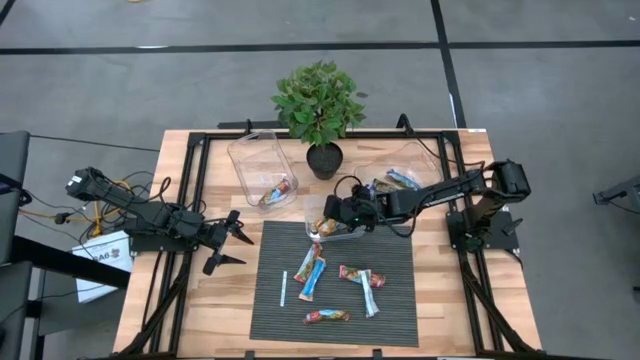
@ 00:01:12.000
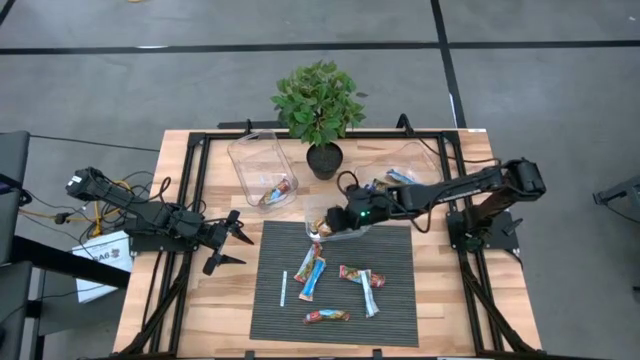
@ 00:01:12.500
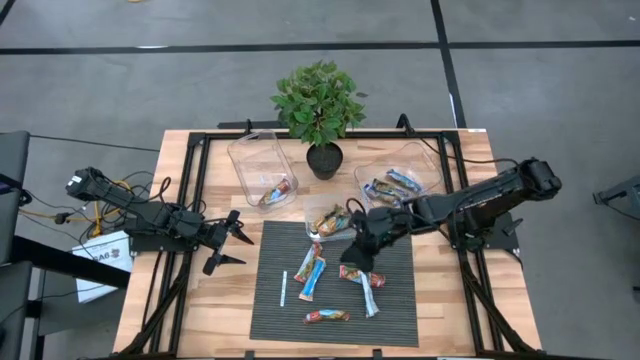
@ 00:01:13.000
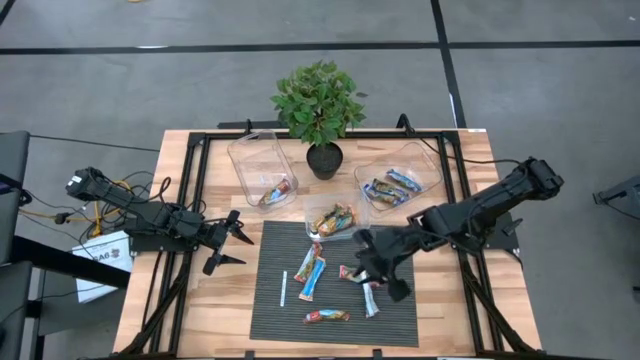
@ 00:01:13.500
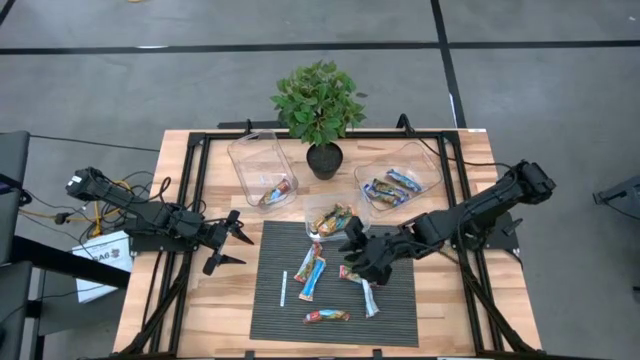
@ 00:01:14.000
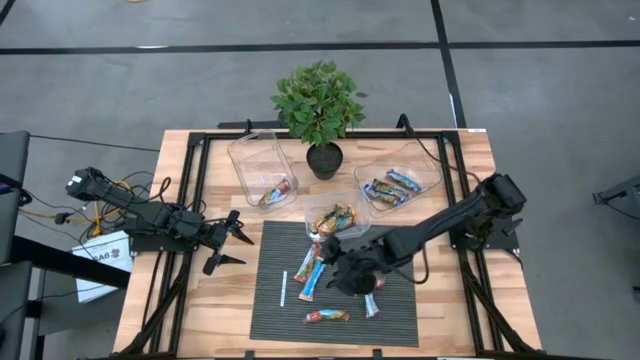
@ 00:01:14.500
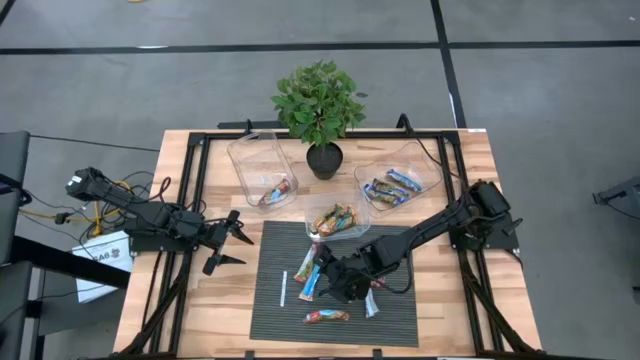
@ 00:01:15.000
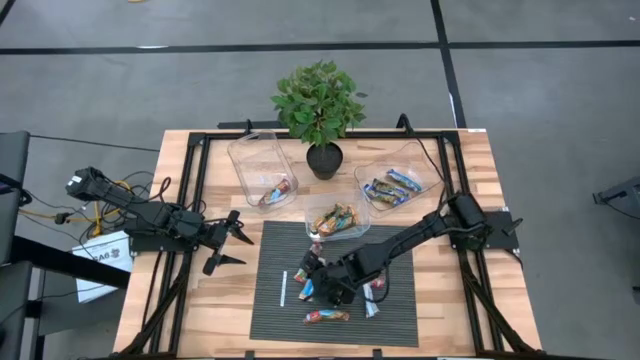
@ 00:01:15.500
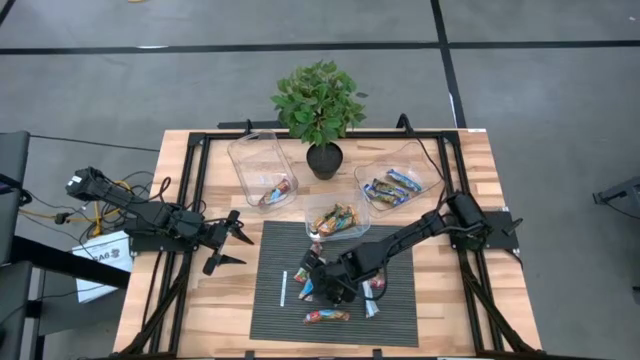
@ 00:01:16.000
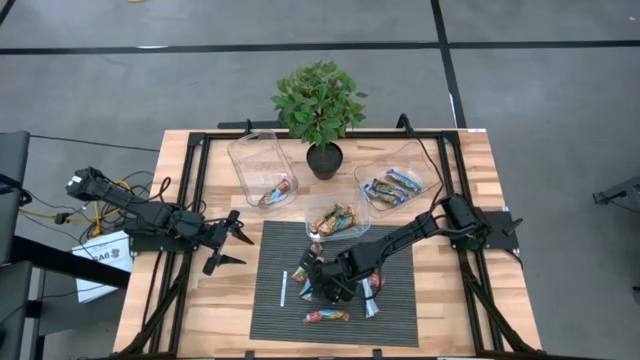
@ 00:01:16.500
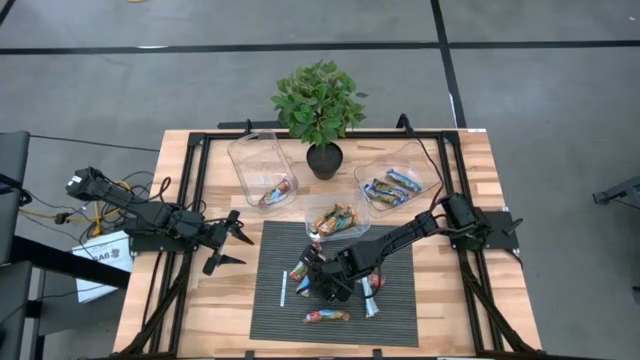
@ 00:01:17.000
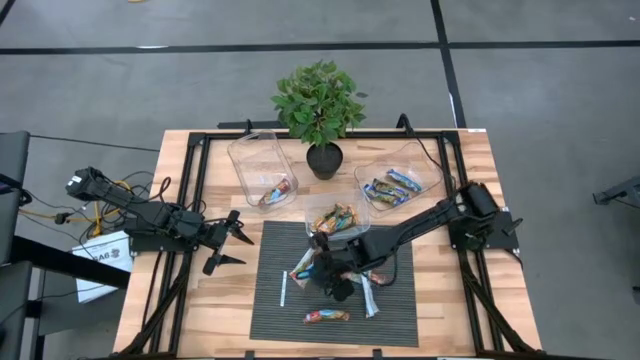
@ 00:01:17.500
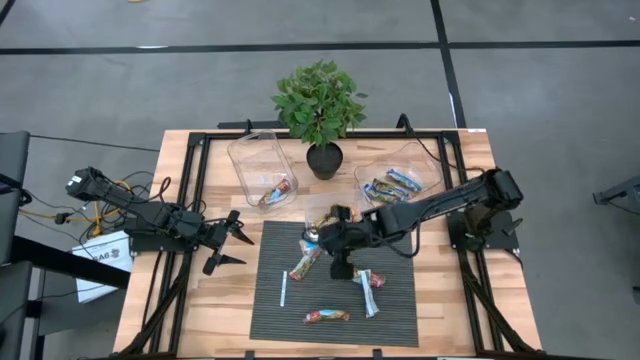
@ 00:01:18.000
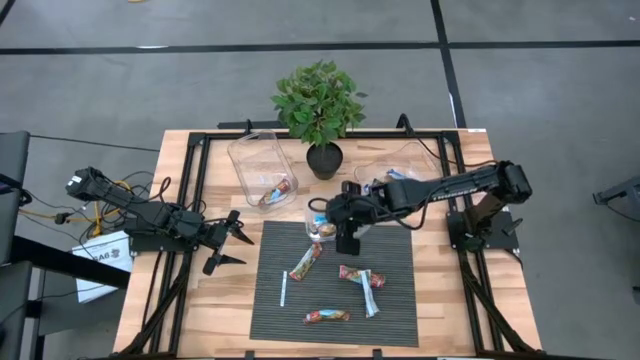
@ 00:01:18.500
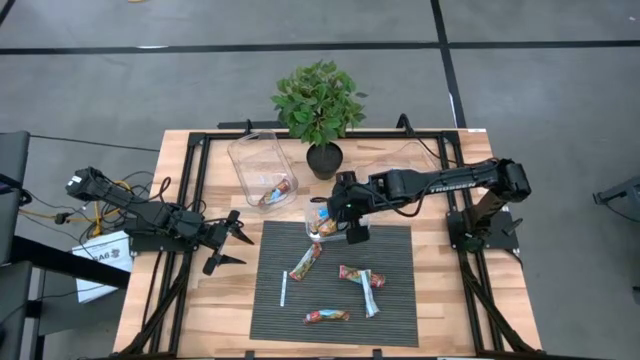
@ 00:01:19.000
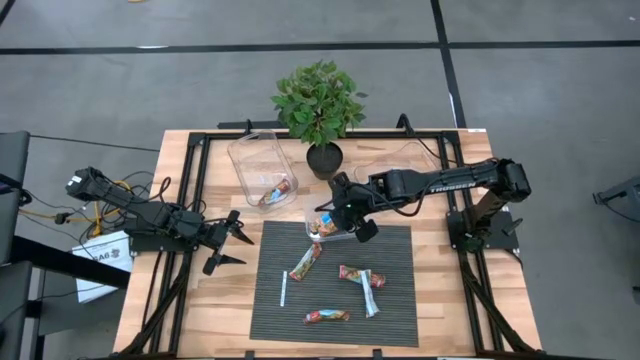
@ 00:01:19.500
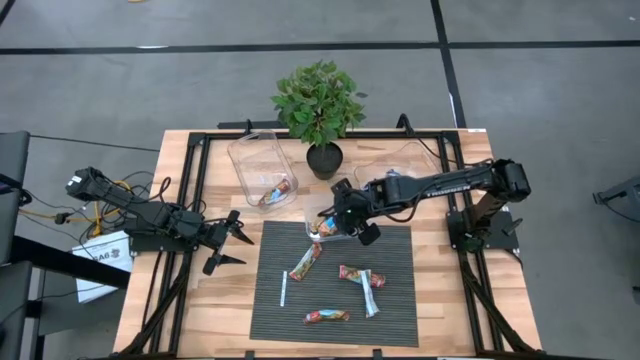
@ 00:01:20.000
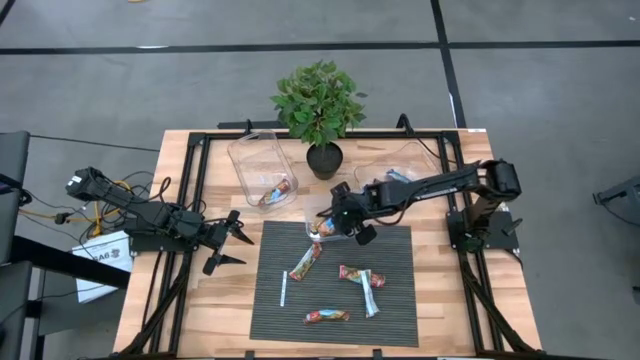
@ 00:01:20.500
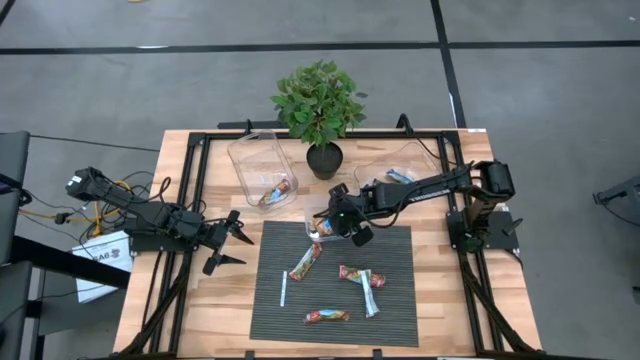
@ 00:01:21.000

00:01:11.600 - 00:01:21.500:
Task: Pick and place Granola Bars by type
Put the orange granola bar into the middle transparent bin

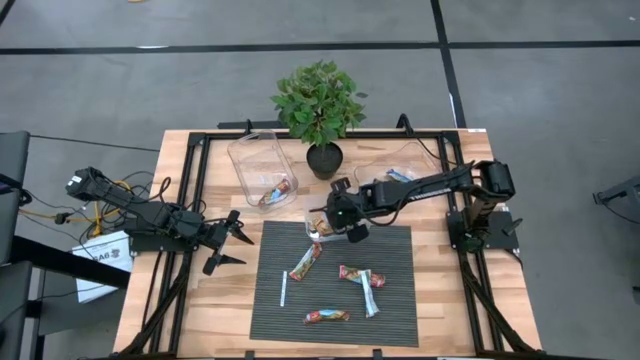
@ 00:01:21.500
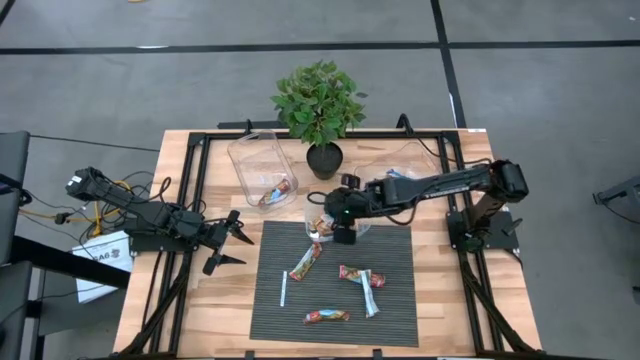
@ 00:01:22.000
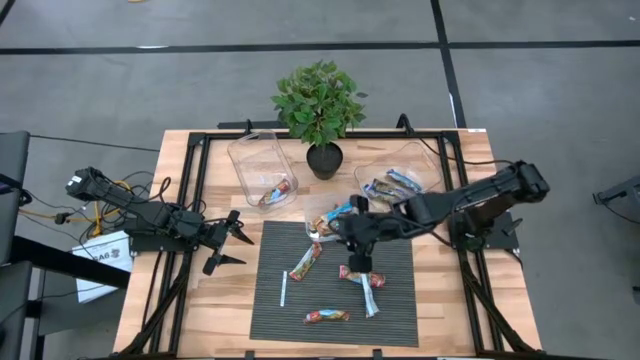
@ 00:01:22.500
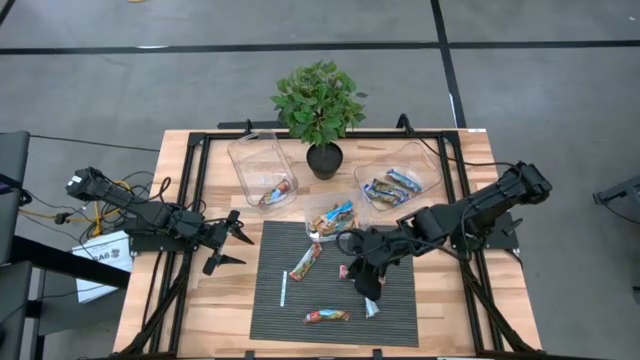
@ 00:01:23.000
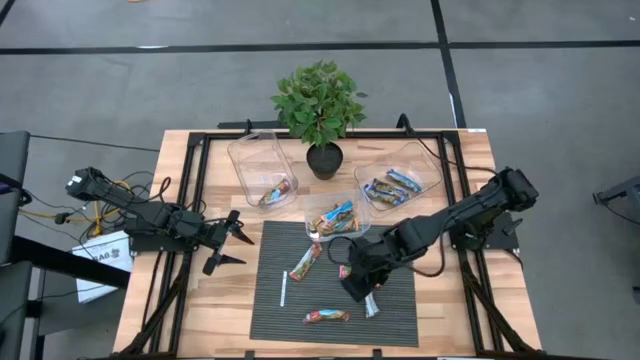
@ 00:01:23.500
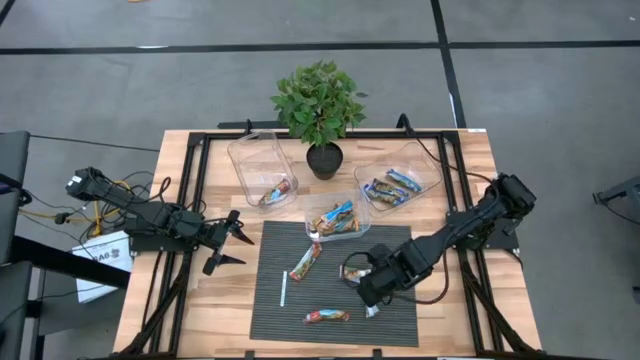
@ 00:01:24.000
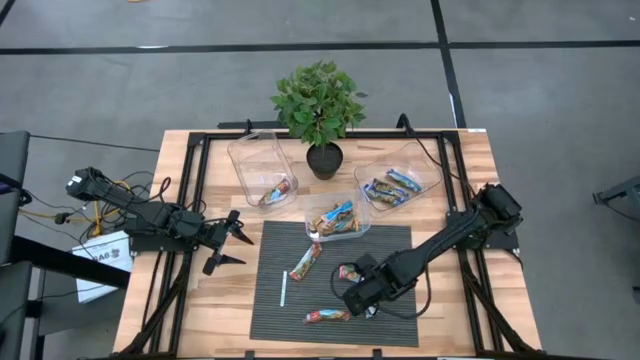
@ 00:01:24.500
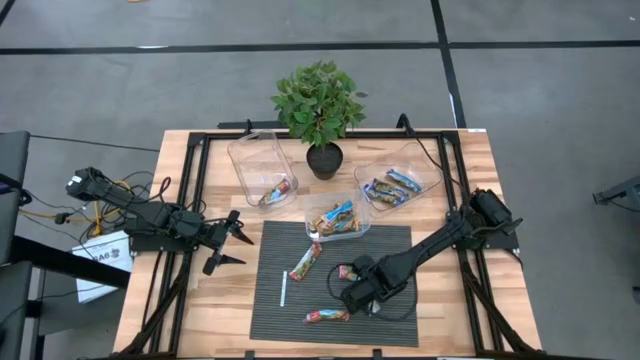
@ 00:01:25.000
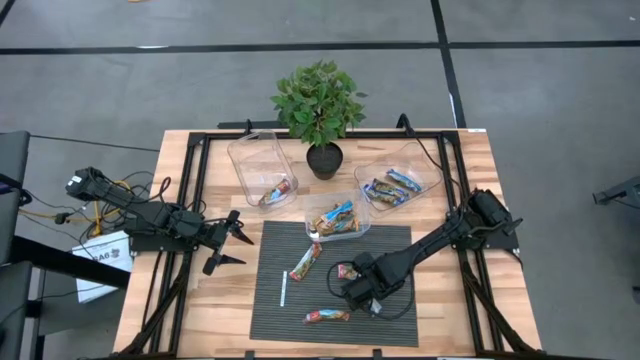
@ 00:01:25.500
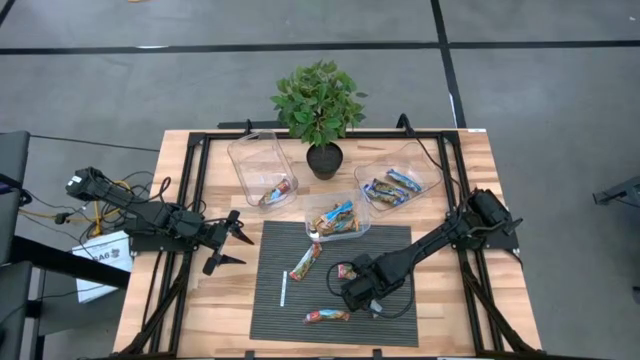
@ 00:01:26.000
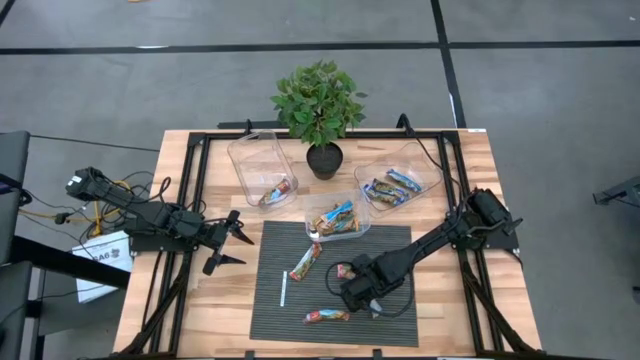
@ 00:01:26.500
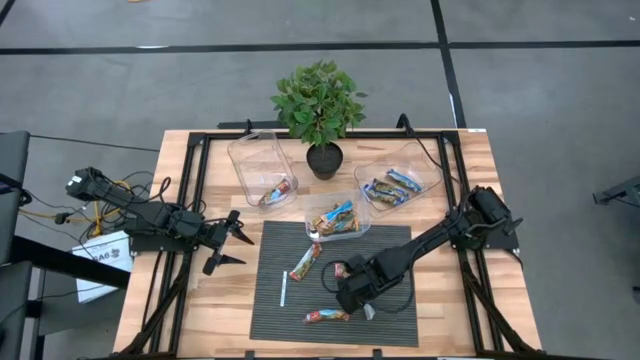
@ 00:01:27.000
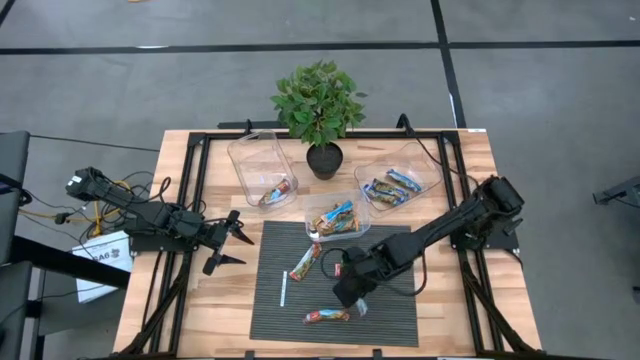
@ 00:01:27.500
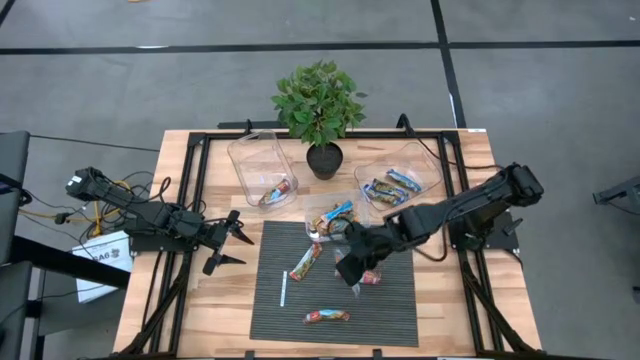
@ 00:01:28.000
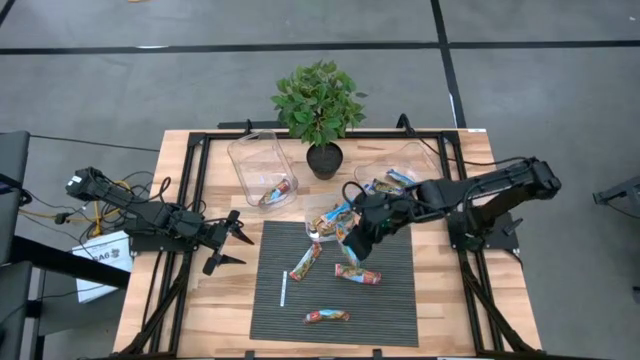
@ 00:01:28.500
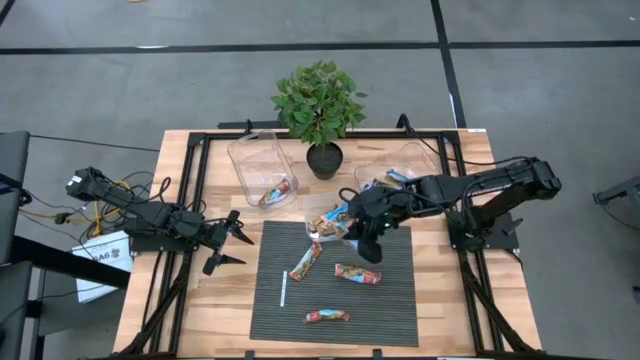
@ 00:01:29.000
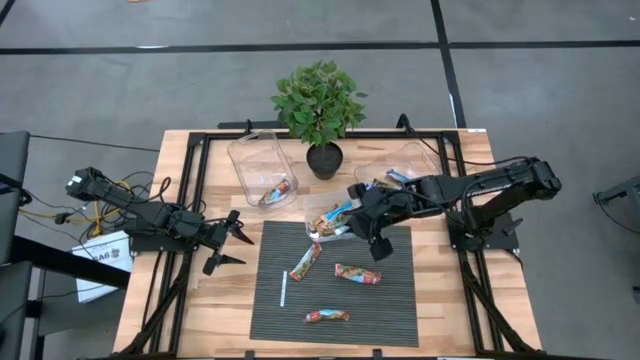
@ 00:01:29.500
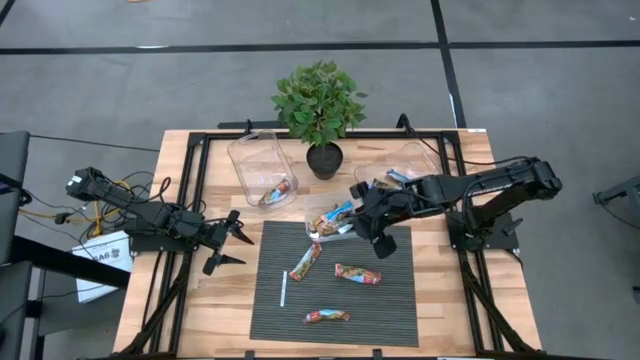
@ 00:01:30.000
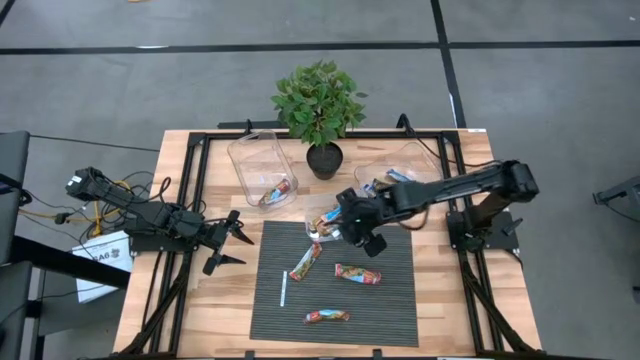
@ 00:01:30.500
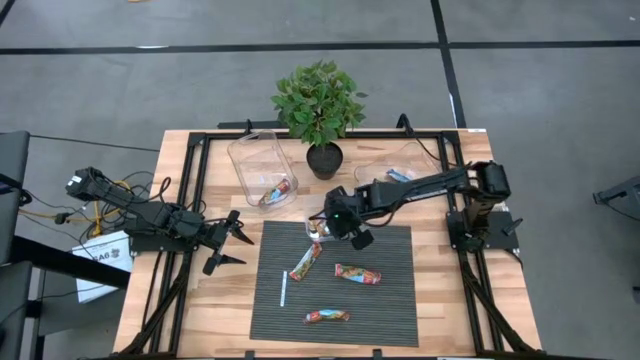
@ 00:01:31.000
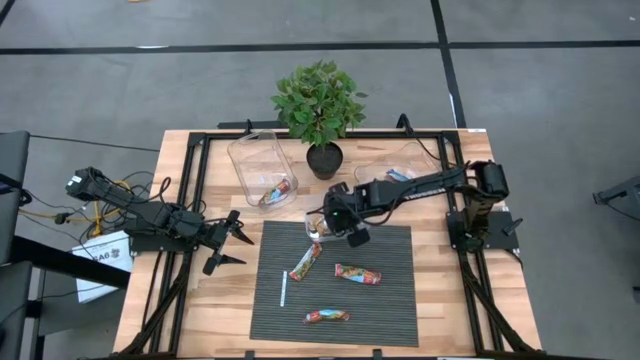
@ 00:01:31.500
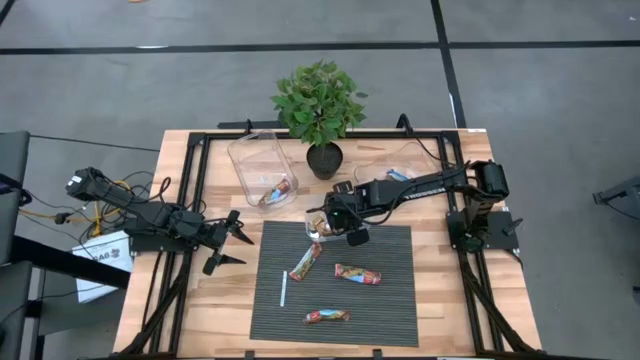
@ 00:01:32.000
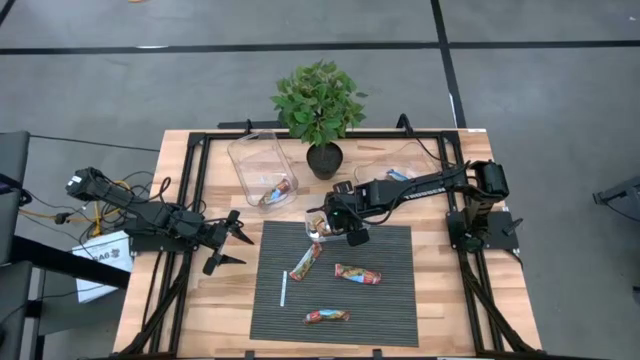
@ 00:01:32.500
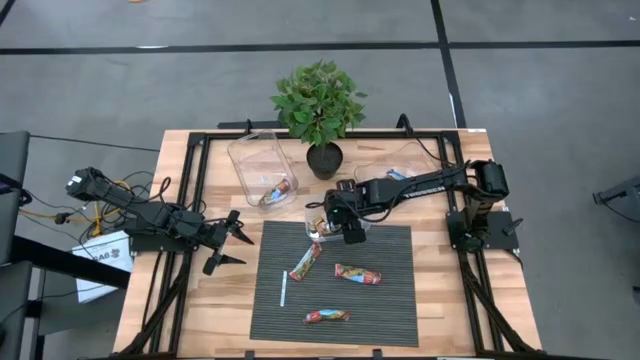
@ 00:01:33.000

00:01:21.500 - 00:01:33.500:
Put the orange granola bar into the middle transparent bin
